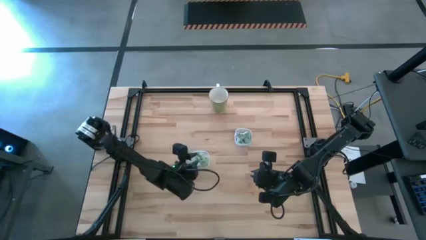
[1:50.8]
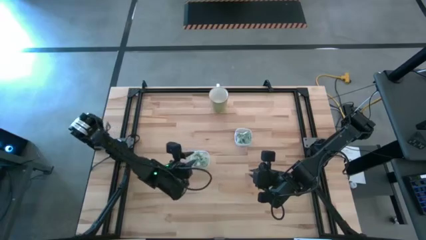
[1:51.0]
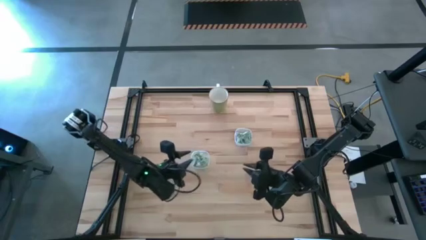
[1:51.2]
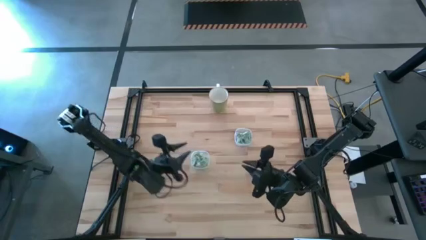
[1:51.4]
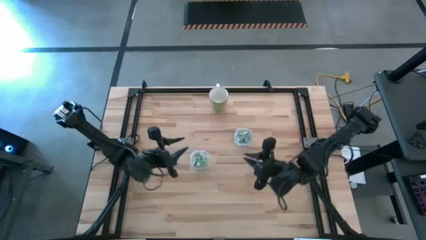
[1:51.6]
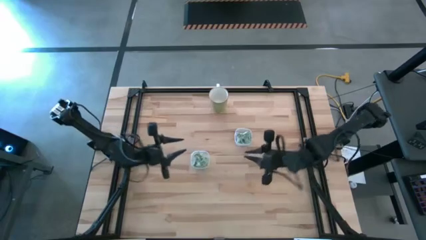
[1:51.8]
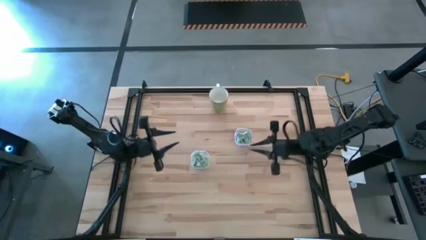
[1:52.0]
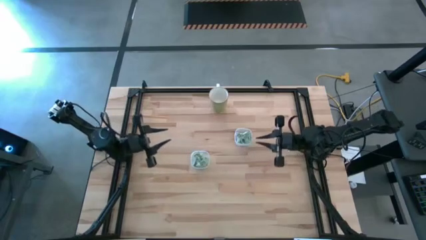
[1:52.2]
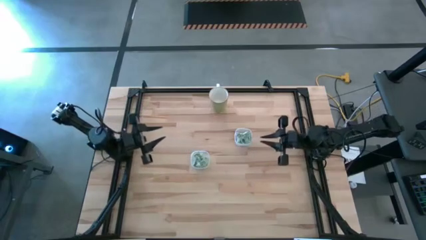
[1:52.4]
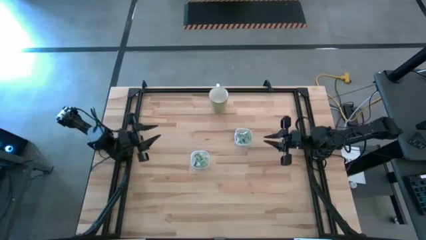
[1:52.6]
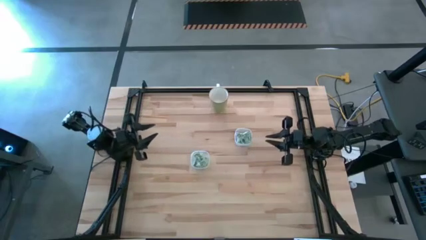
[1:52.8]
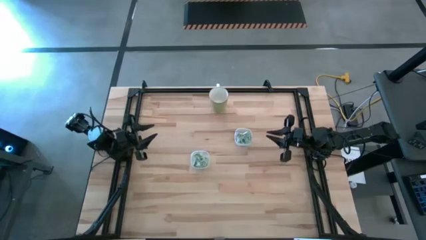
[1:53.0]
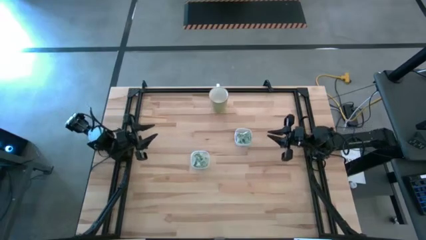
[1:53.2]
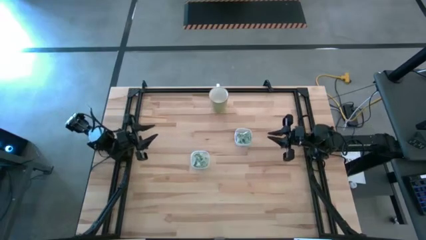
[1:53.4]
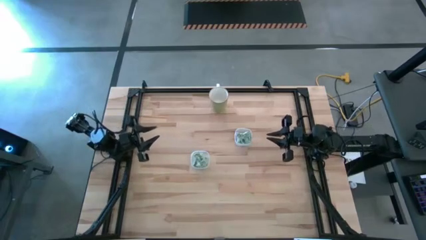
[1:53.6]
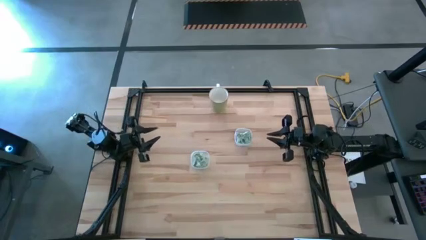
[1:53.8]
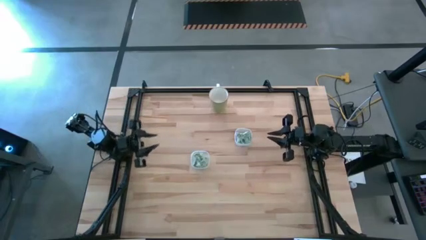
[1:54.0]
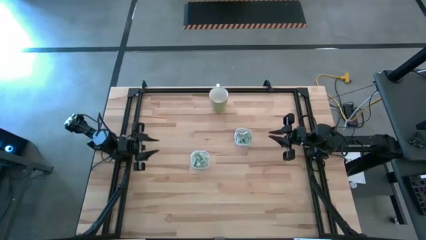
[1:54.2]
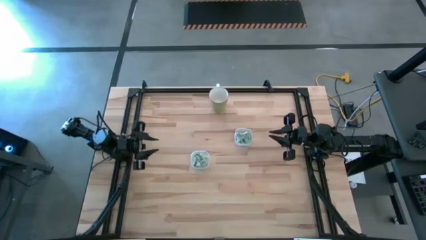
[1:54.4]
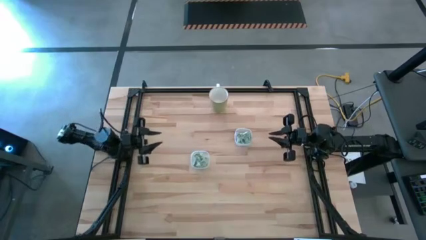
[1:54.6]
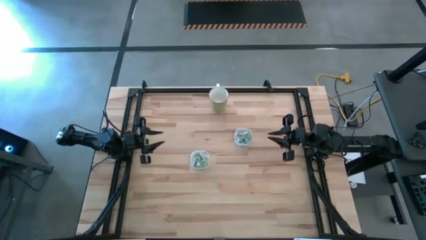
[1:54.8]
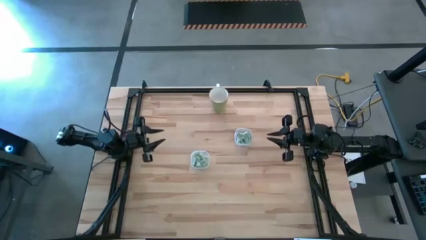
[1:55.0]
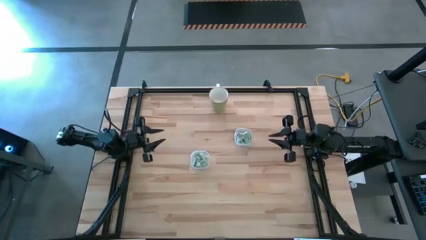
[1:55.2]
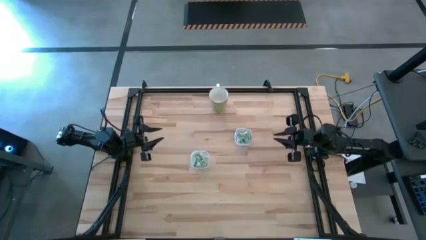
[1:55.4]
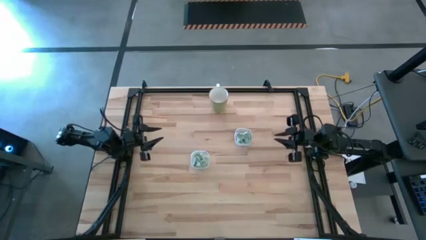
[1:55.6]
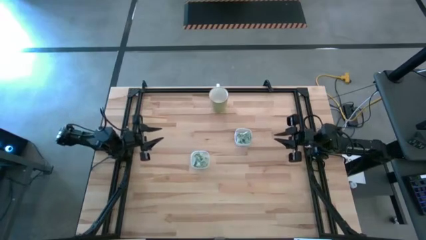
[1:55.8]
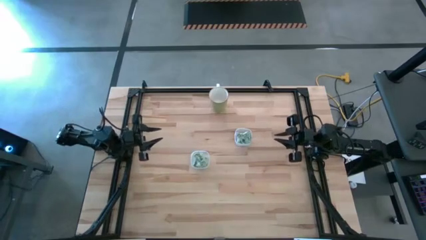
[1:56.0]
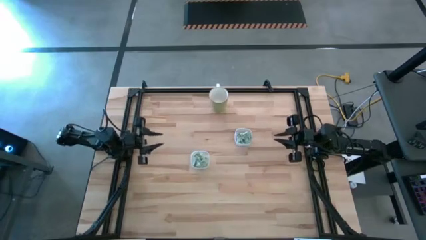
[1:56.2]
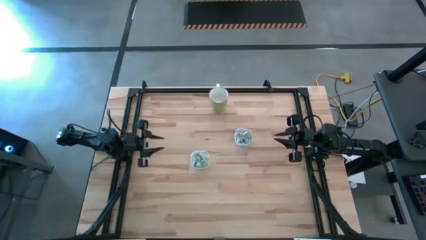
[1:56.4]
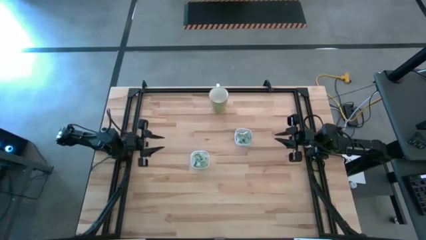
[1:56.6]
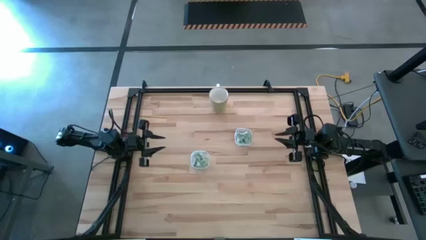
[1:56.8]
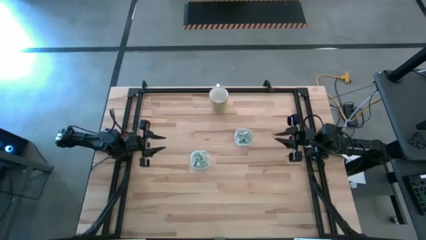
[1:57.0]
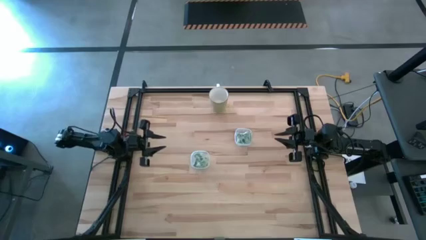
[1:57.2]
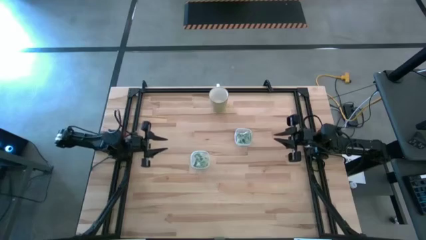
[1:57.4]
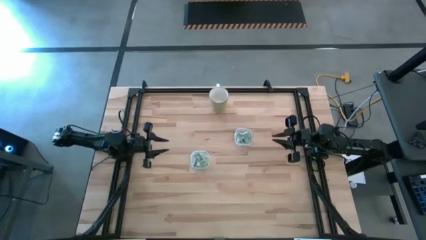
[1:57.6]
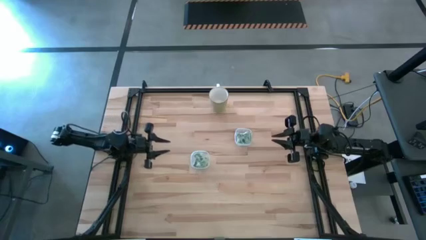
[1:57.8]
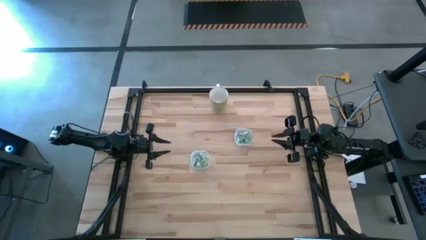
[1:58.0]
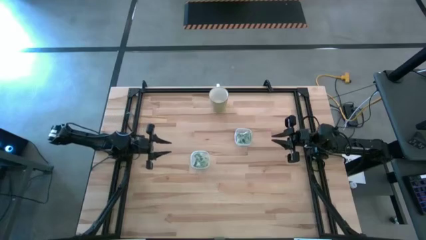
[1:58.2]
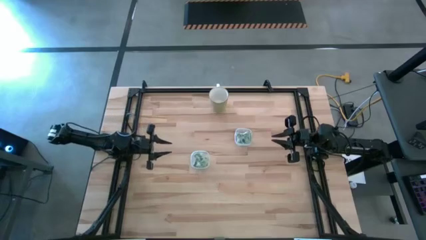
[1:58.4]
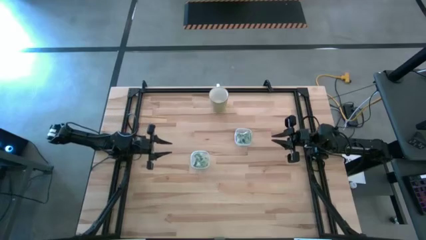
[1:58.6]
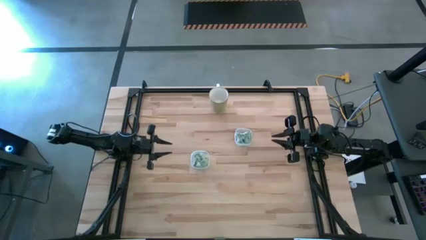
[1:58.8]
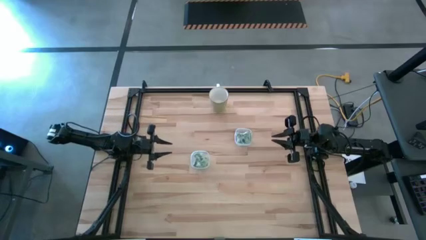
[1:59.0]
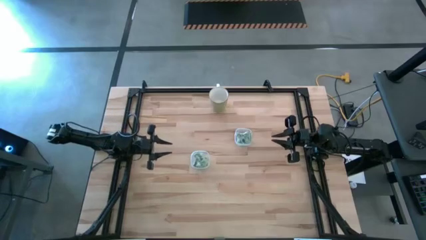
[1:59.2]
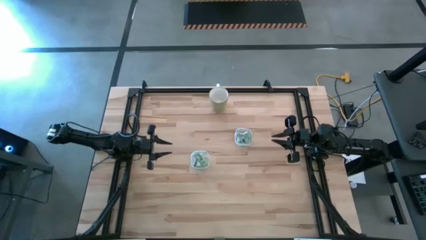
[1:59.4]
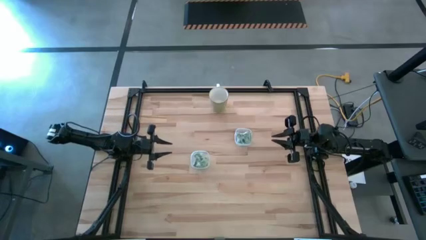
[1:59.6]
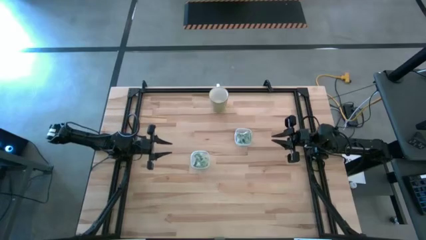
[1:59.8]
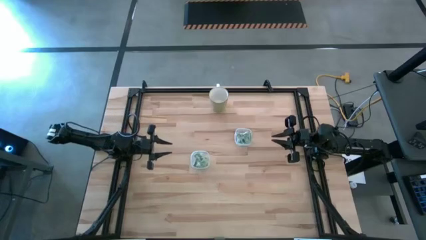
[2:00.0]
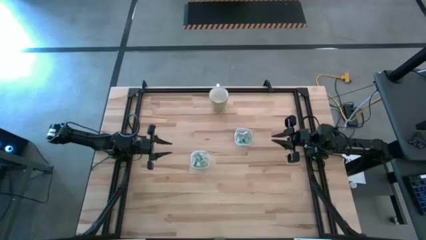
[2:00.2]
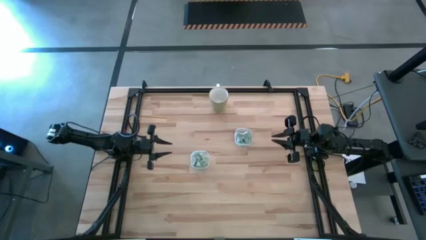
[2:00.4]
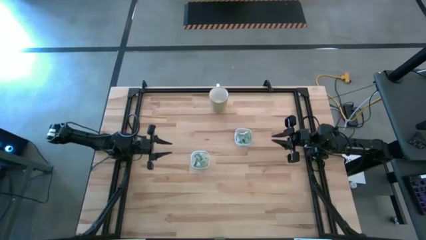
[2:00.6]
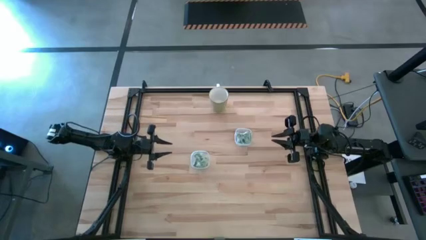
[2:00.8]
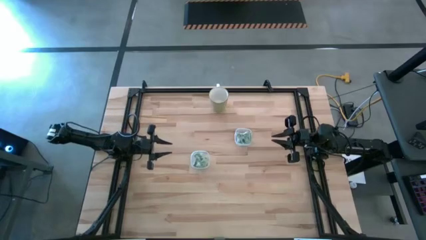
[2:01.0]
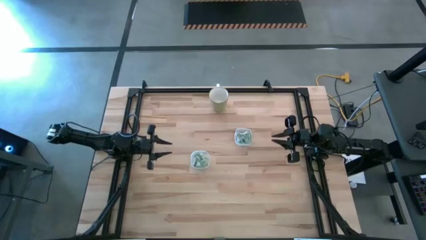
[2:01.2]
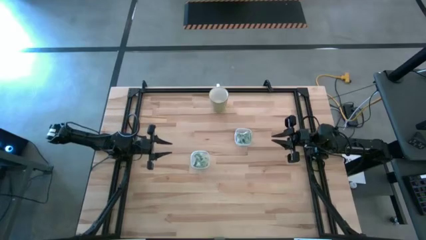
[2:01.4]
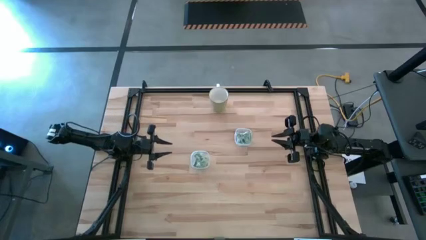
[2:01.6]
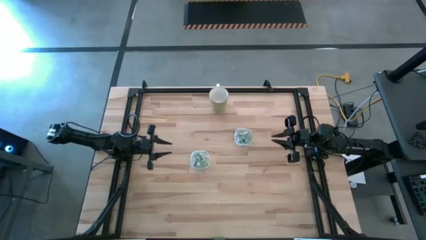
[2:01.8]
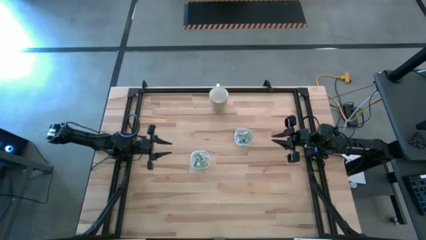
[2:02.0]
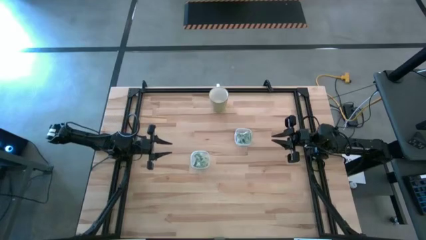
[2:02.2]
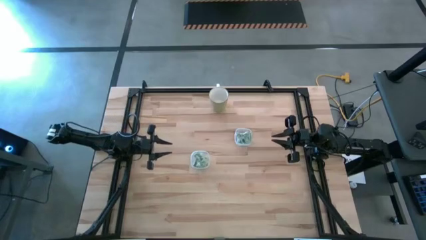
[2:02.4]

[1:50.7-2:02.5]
Task: Pick and place Stevia / Truvia into bins
Return to Home Position

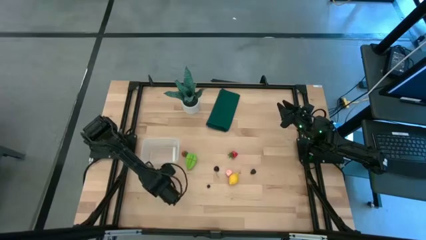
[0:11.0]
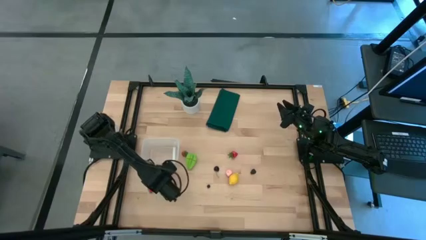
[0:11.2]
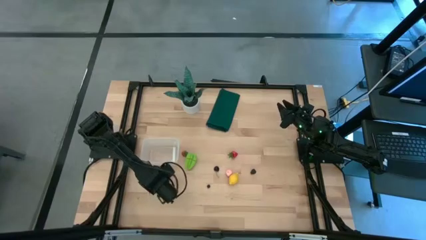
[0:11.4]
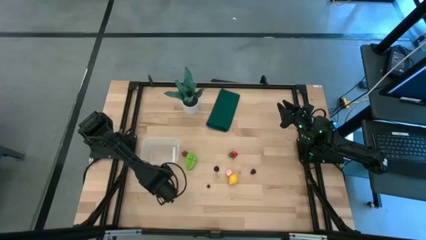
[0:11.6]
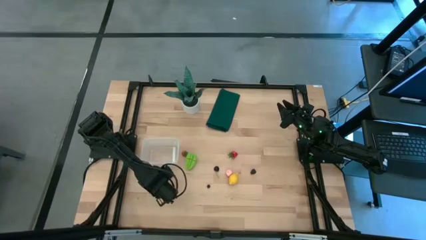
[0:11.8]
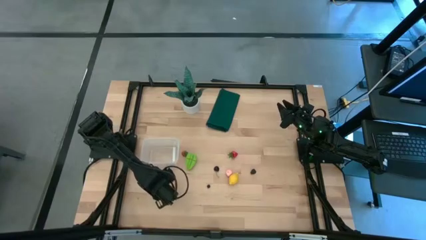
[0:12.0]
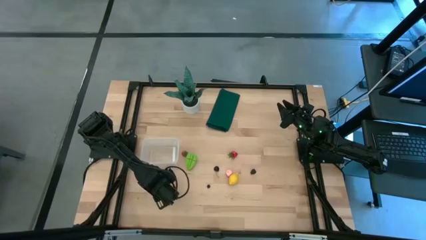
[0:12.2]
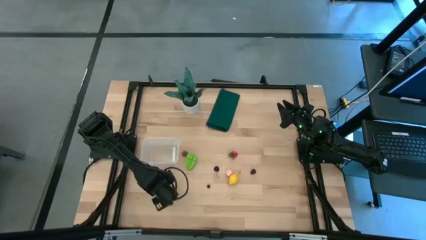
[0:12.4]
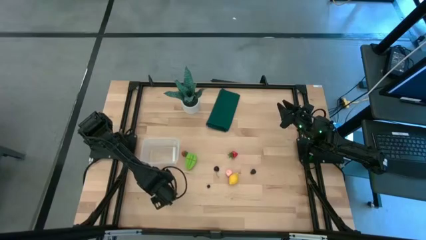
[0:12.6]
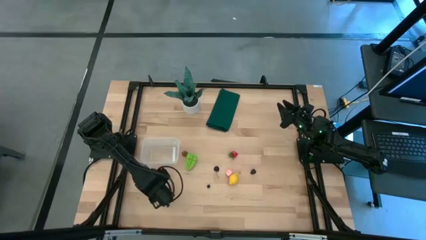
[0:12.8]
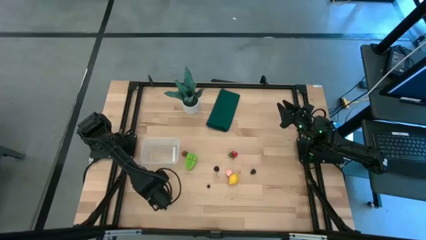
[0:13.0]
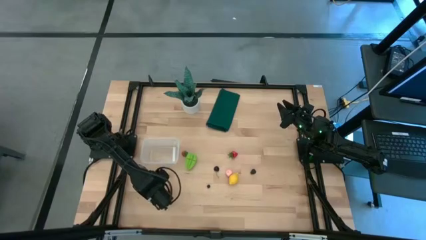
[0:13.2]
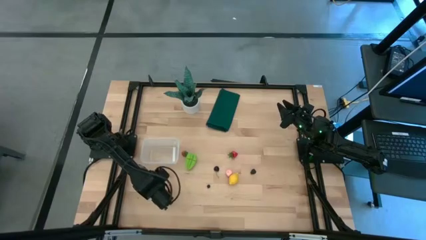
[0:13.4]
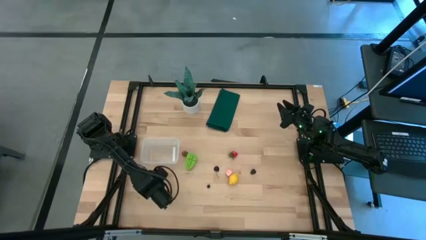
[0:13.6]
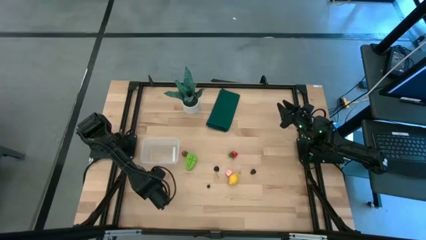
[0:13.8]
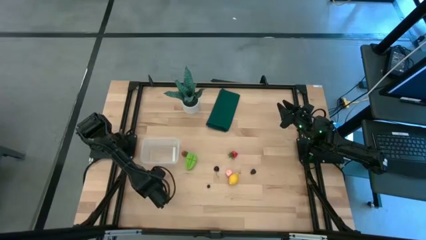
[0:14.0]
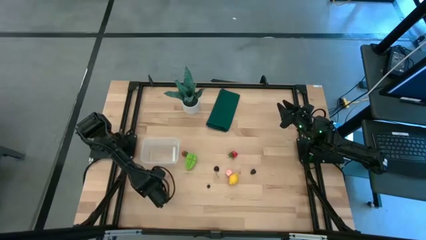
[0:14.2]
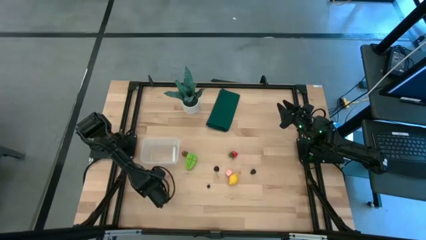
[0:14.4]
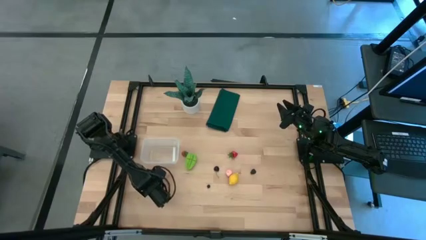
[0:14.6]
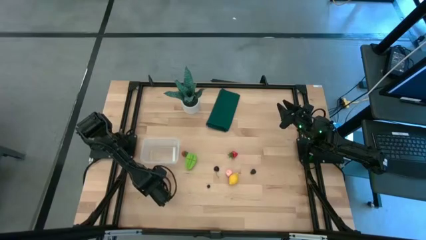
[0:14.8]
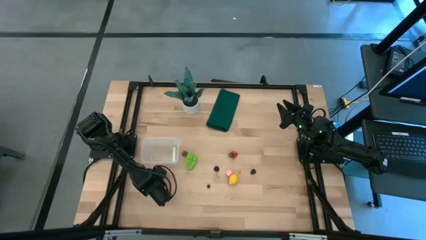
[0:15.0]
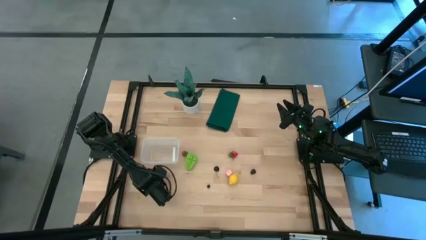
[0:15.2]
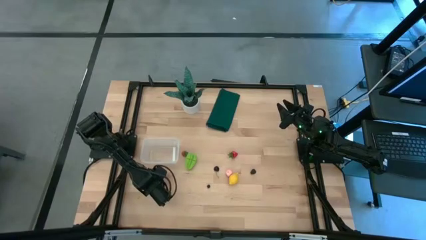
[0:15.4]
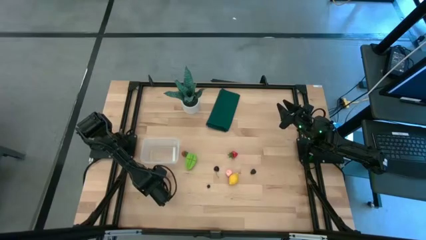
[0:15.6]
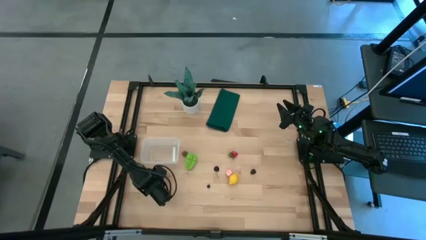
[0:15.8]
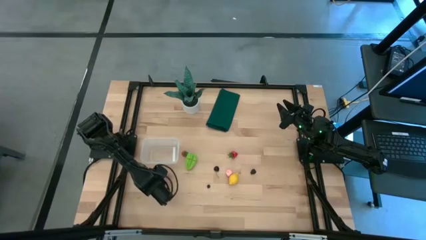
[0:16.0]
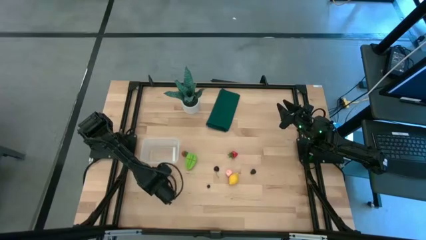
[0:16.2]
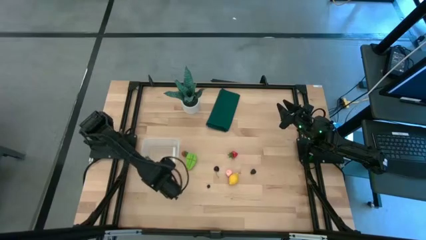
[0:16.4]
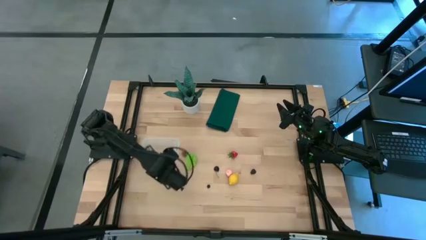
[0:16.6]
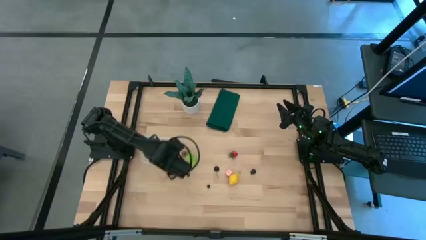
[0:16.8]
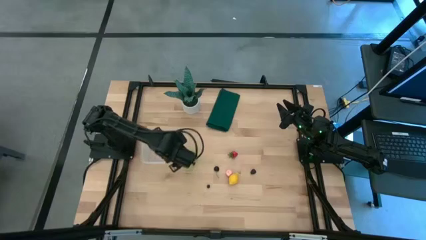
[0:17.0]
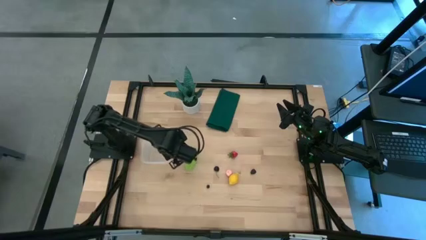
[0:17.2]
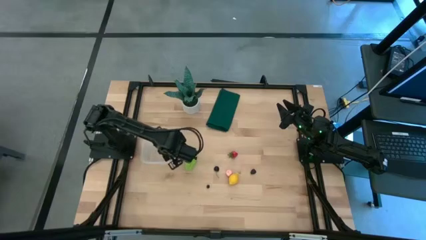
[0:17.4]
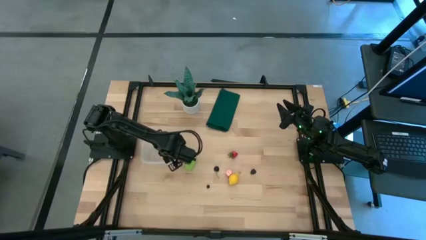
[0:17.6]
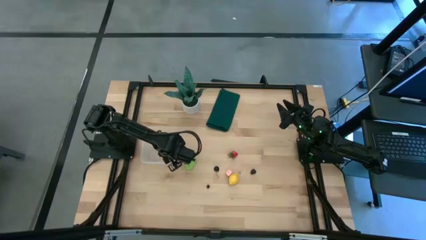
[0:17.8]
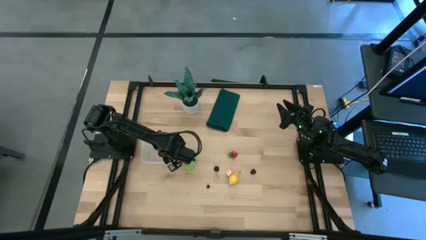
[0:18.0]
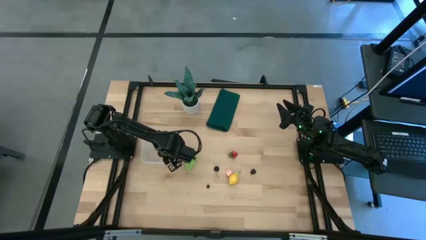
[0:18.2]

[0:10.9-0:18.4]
Task: Pick and placing Produce into tupperware
Put the bottom strawberry into the transparent bin
